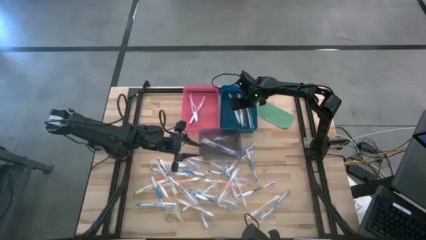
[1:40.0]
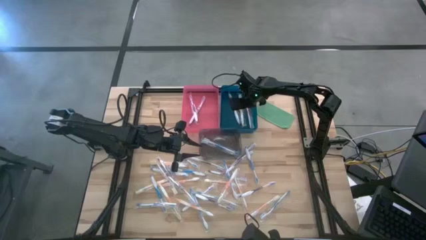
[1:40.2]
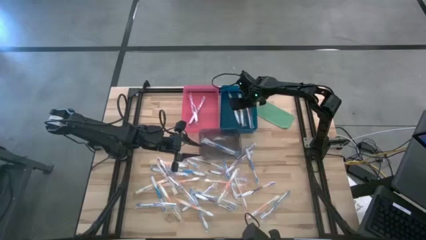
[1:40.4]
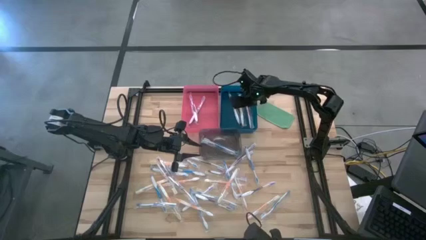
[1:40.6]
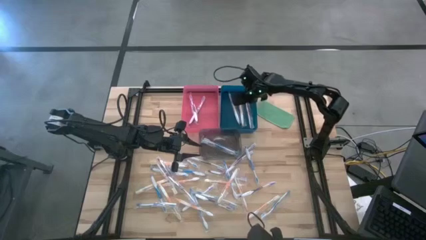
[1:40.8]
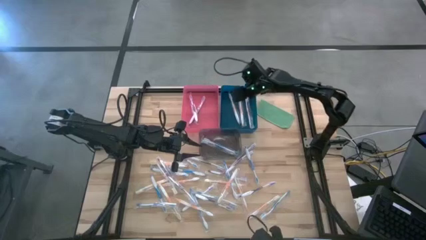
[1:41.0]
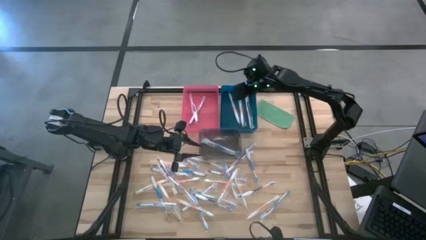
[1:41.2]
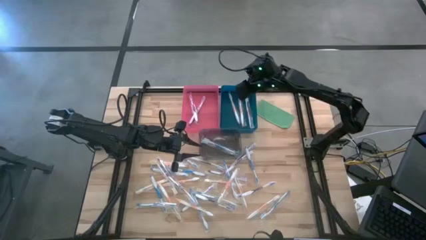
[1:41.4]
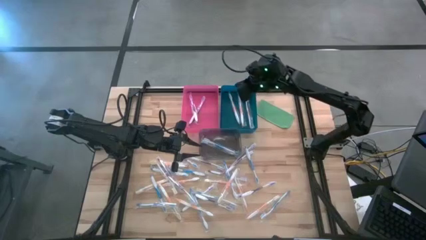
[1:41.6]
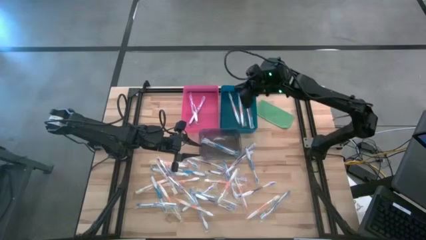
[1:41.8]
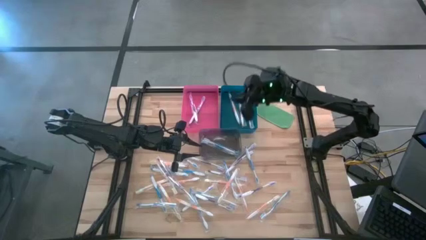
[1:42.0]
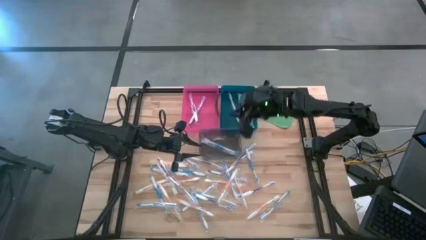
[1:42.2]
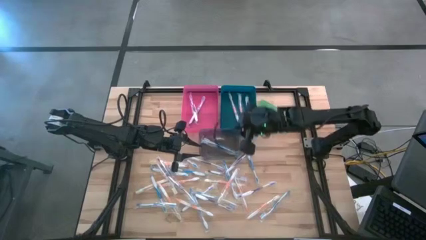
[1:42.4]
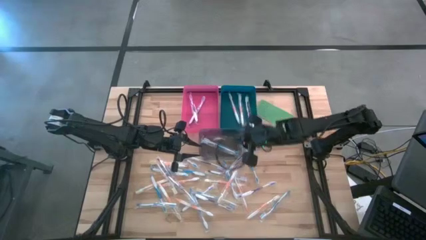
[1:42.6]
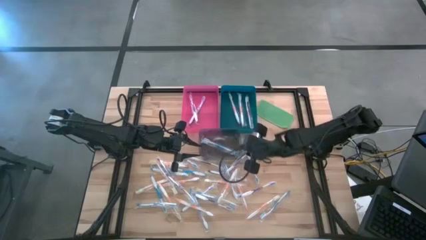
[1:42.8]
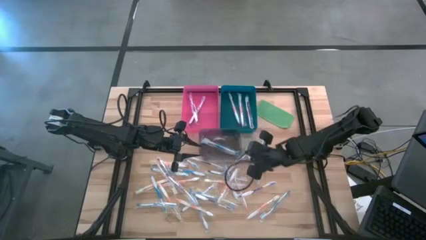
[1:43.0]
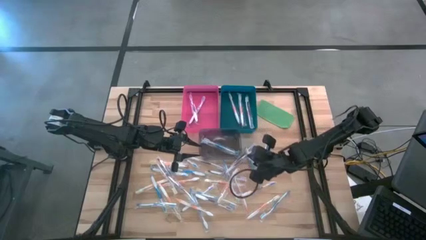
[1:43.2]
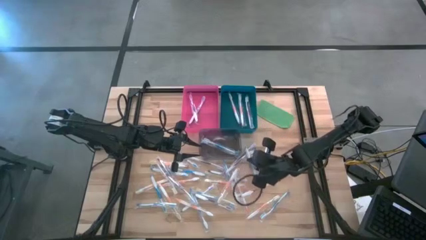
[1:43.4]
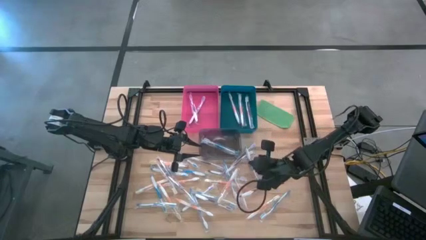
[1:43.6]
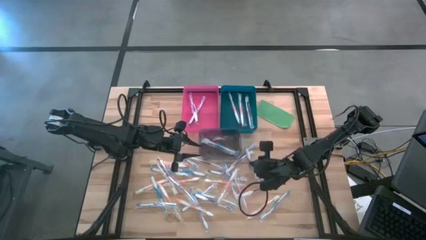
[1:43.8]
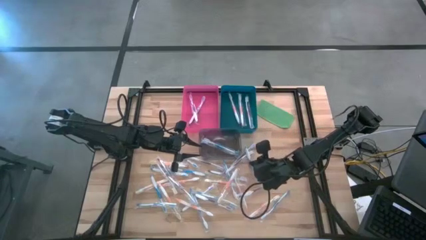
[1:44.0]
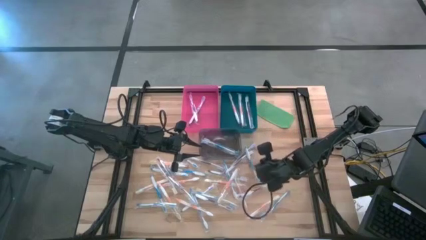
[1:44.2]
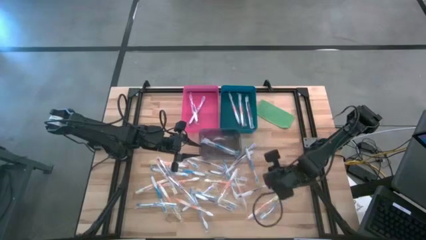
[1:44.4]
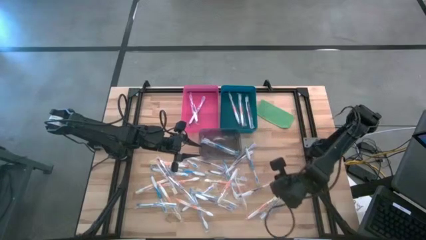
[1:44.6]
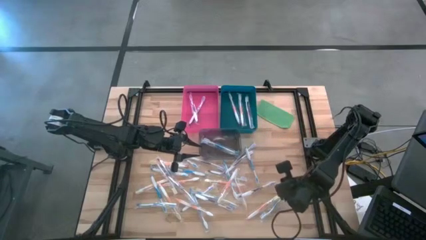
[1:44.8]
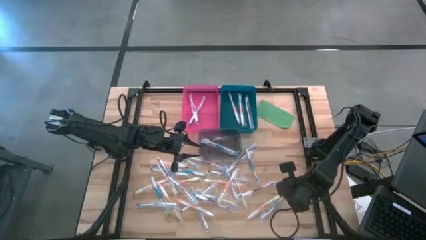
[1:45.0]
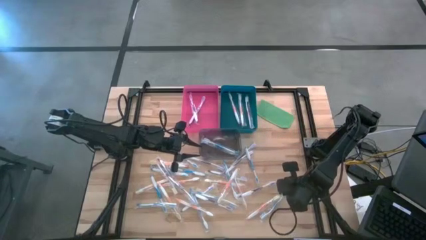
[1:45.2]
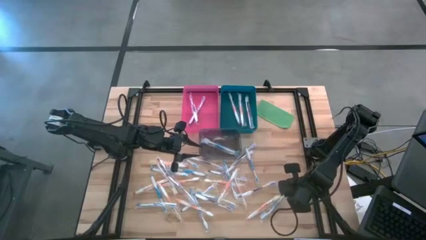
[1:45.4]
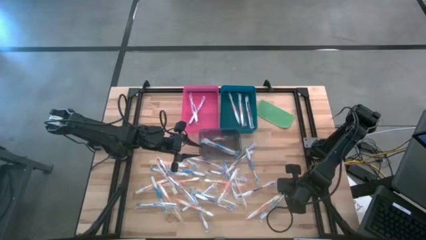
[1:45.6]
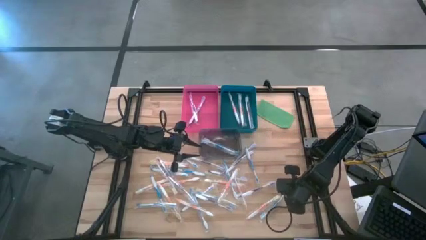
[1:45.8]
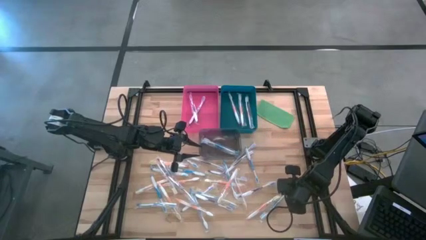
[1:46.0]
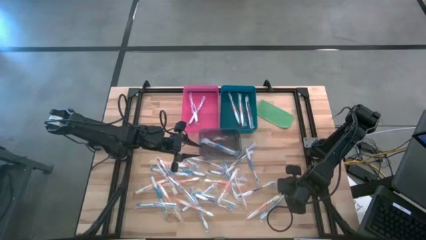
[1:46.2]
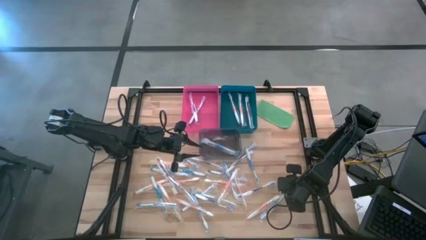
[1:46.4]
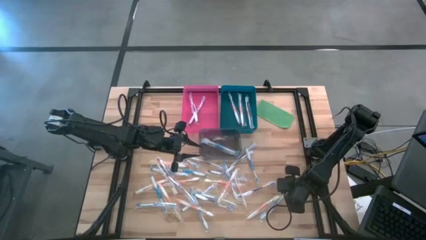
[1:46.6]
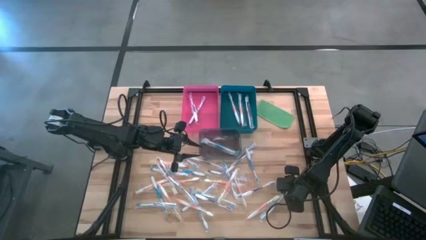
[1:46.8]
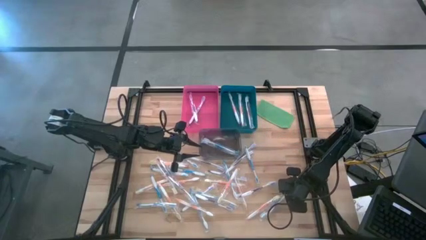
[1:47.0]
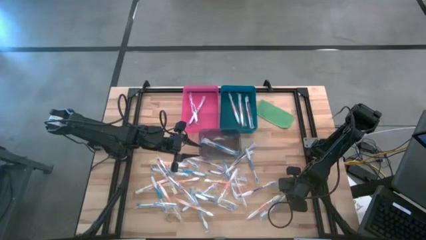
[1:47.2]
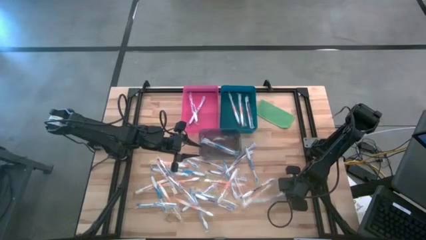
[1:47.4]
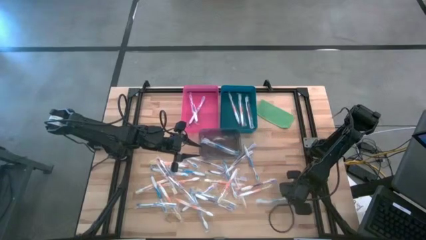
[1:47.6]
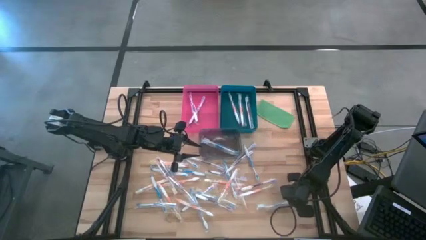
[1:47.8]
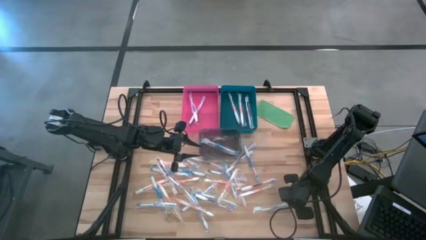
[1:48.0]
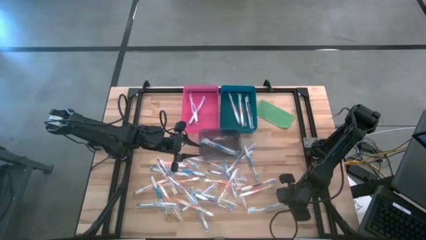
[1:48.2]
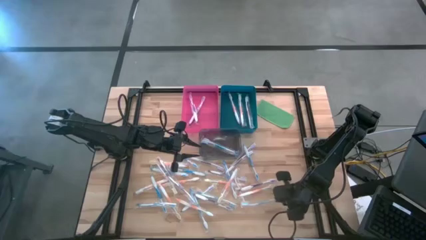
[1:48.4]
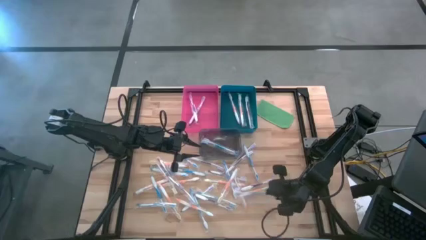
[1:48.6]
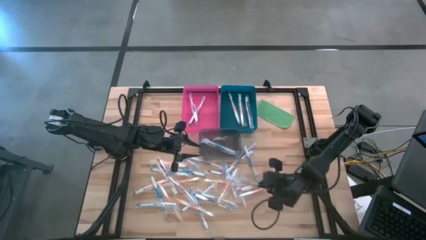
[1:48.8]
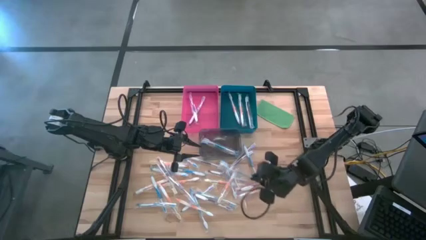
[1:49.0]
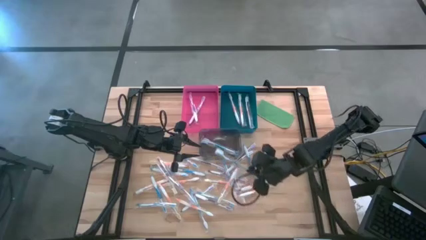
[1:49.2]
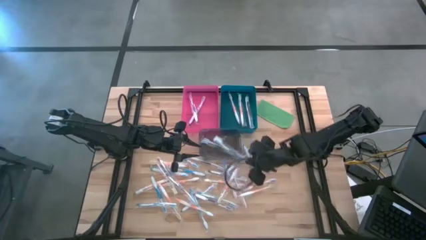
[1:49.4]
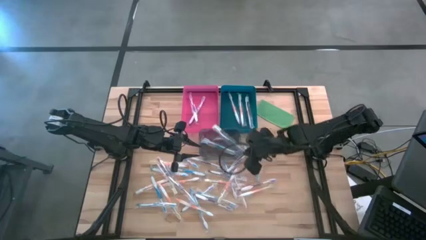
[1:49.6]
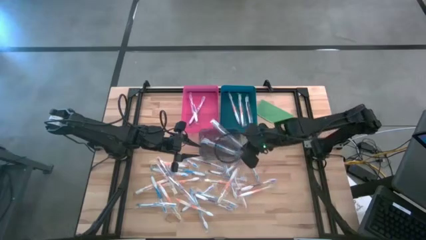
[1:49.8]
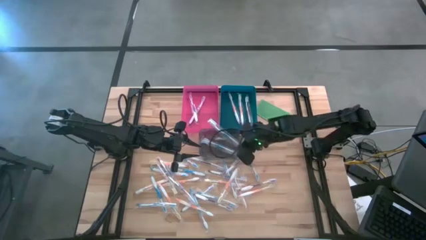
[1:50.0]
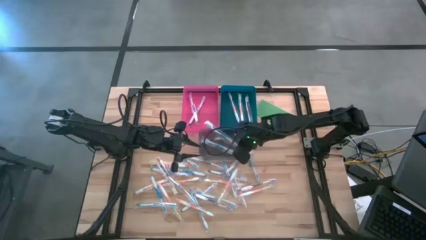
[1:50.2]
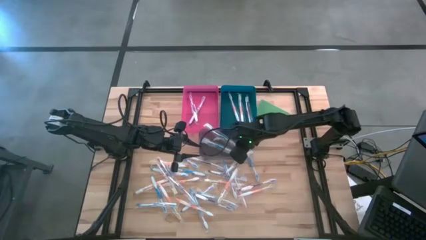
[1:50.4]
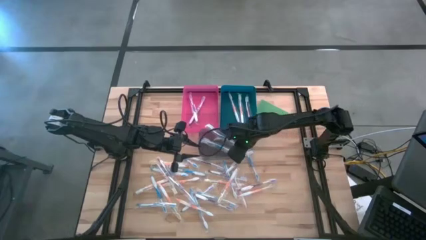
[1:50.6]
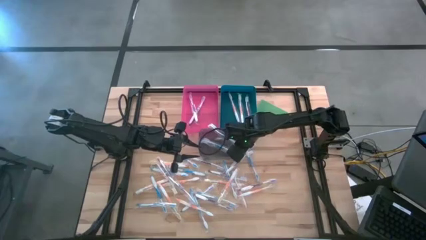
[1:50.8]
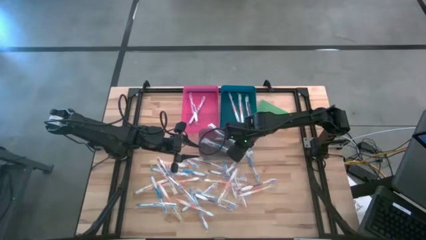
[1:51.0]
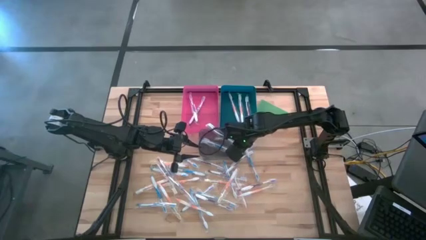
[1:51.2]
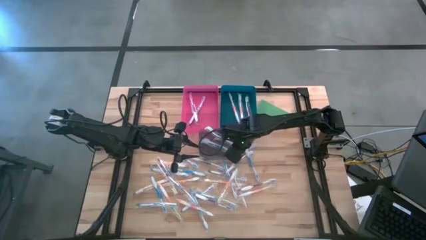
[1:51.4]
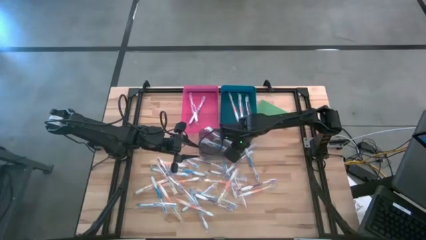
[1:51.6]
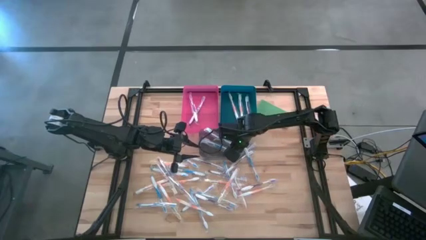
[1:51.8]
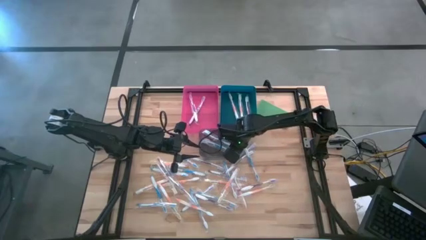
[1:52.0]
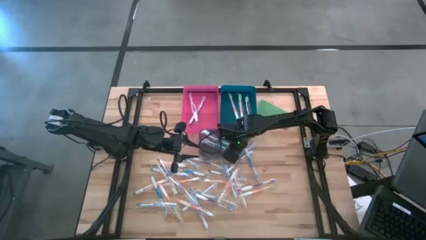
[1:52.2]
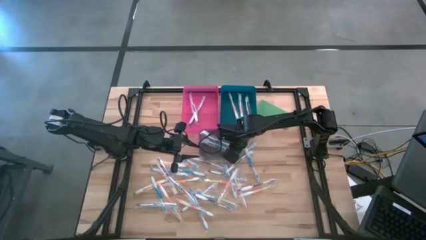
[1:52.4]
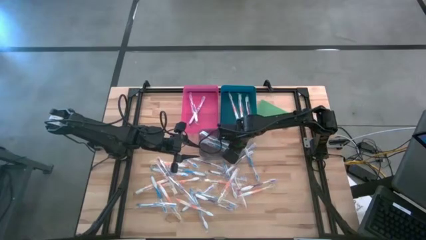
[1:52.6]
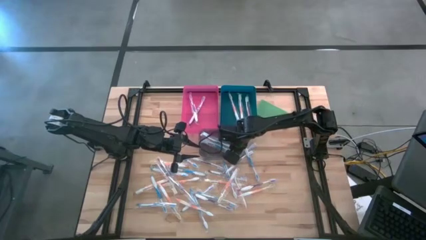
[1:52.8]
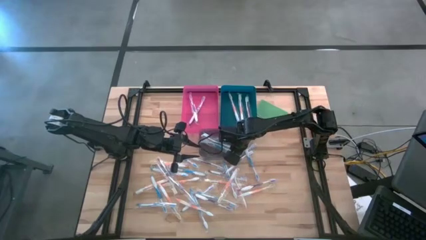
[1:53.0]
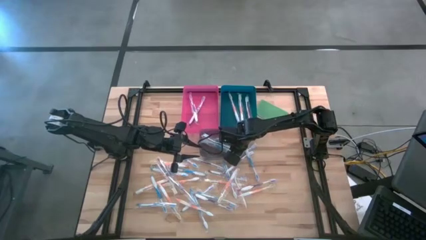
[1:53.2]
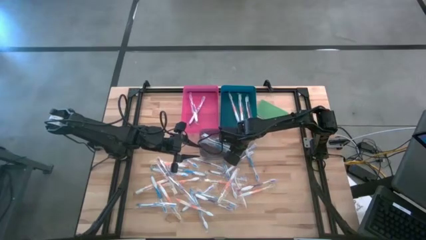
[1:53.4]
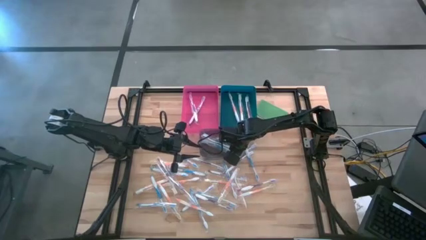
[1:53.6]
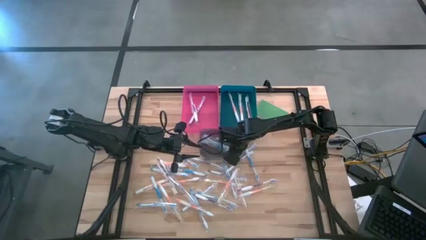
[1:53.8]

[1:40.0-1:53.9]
Task: Pick & Place Toothbrushes
Put the blue toothbrush into the transparent gray bin

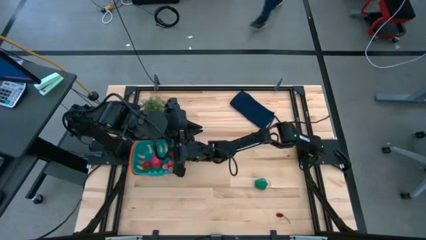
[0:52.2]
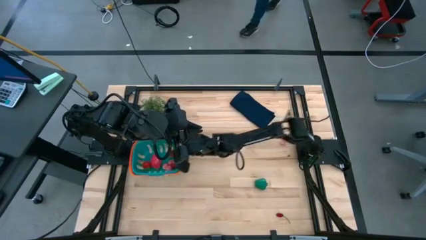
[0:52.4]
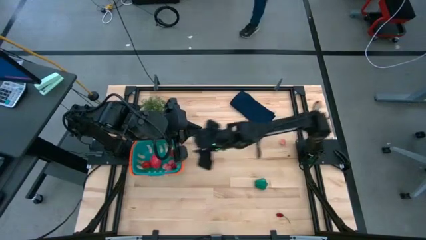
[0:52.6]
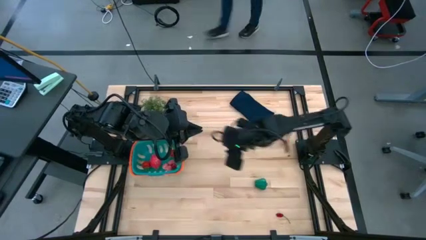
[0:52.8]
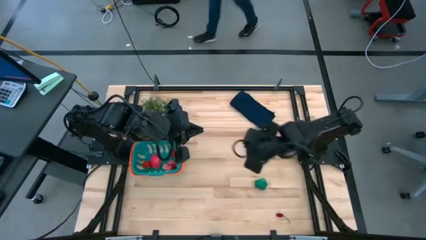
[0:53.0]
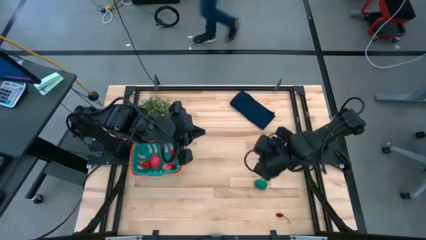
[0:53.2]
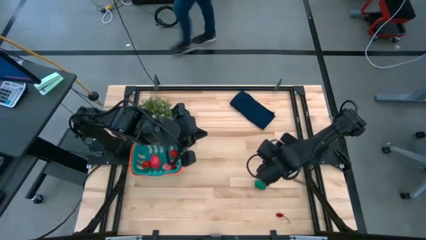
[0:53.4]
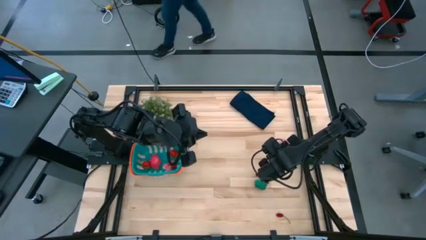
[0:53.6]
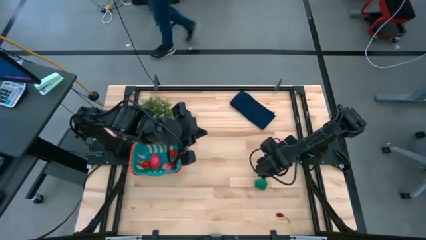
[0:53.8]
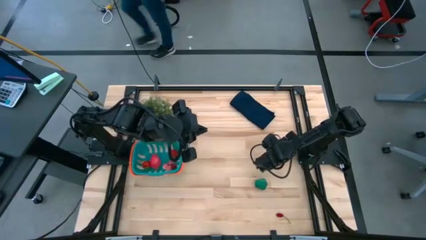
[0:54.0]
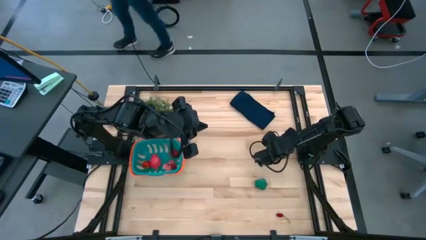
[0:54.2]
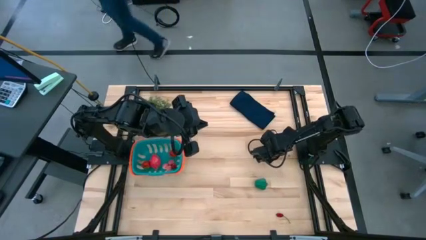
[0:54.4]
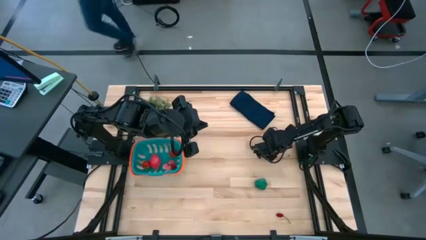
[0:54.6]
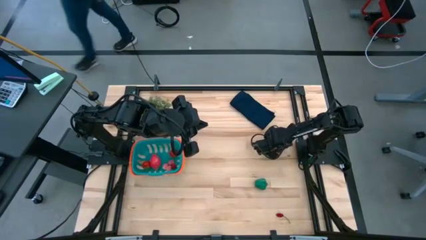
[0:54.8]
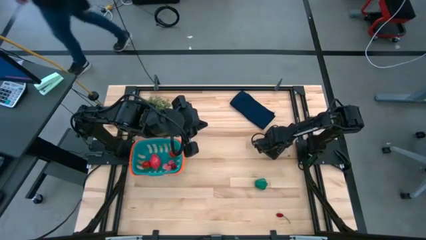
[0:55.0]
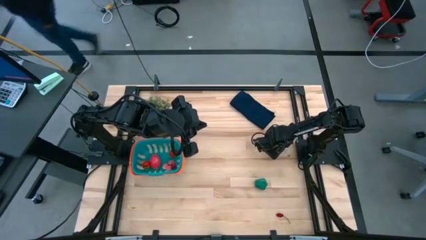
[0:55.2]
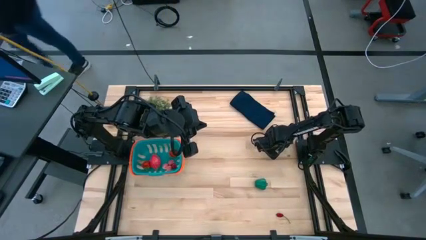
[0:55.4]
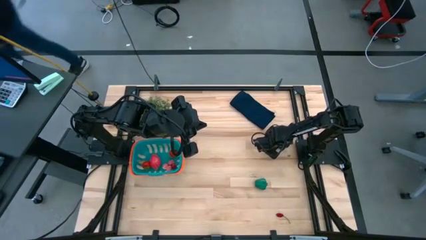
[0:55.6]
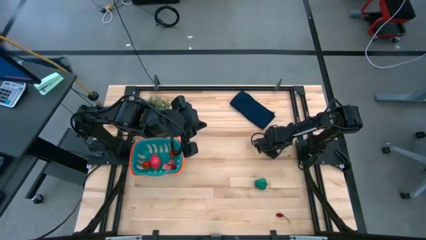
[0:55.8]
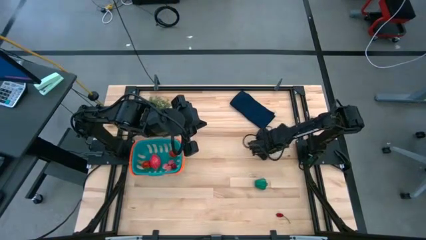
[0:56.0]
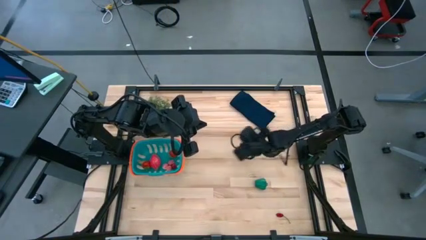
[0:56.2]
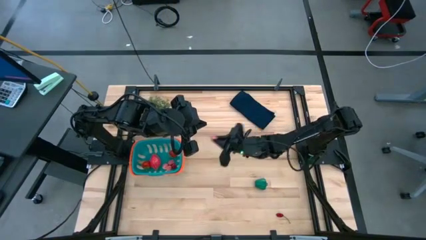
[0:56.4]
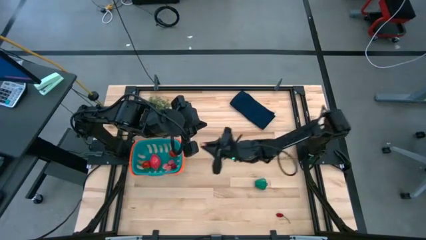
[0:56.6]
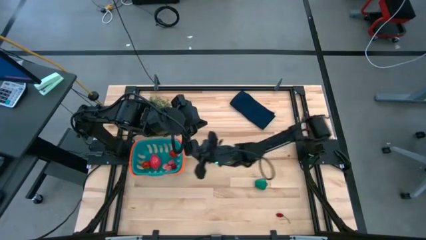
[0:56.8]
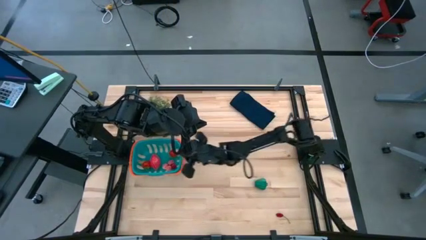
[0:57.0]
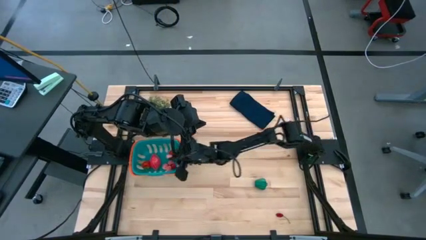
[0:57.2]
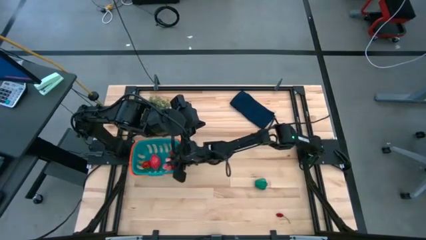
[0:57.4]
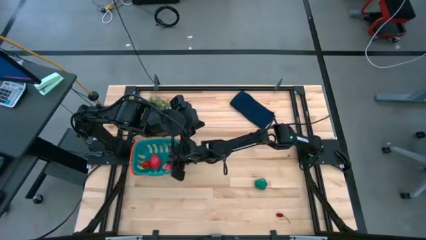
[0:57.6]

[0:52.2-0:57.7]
Task: Pick and placing Produce into tupperware
Put the peach into the green basket
